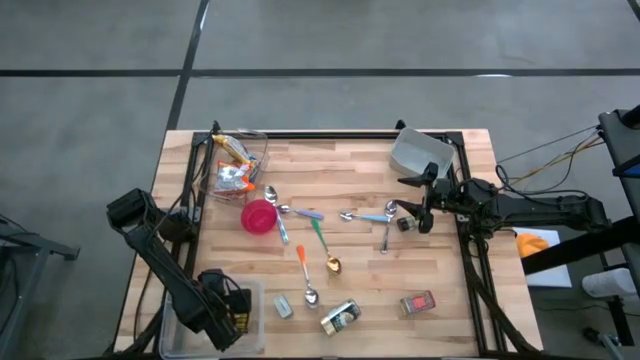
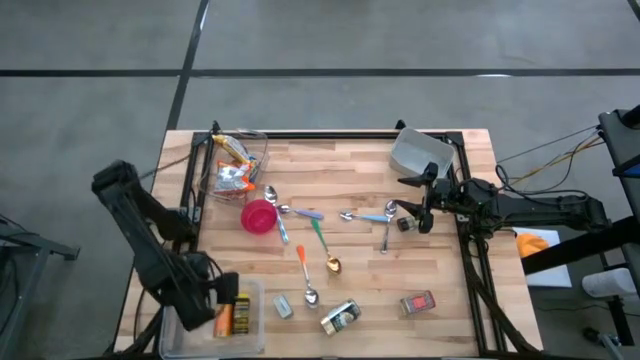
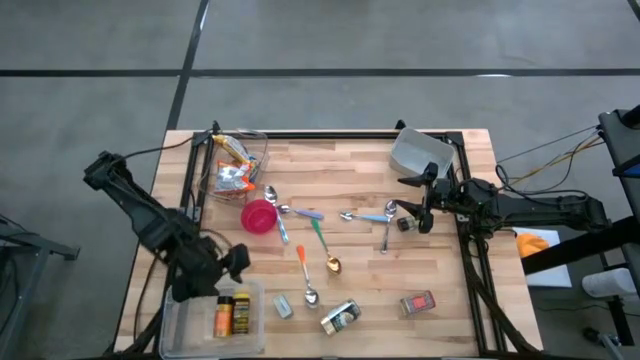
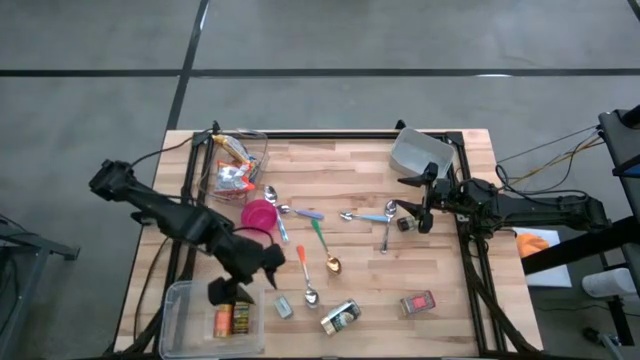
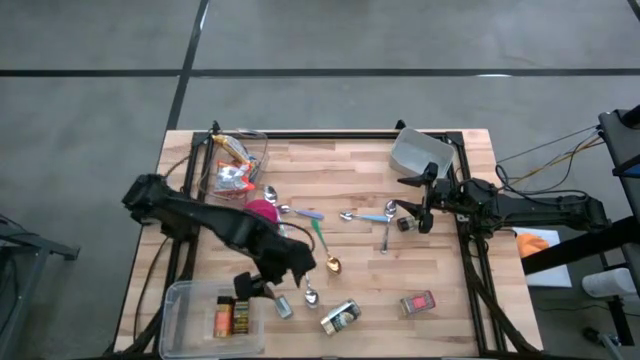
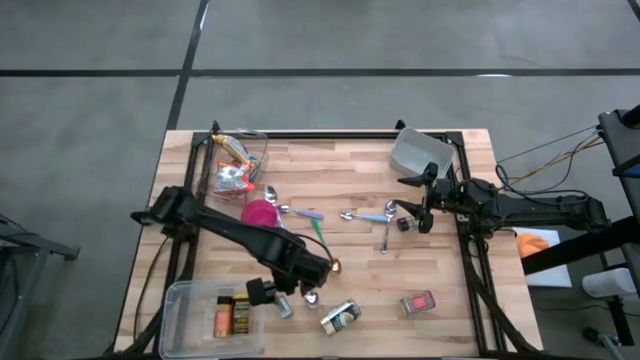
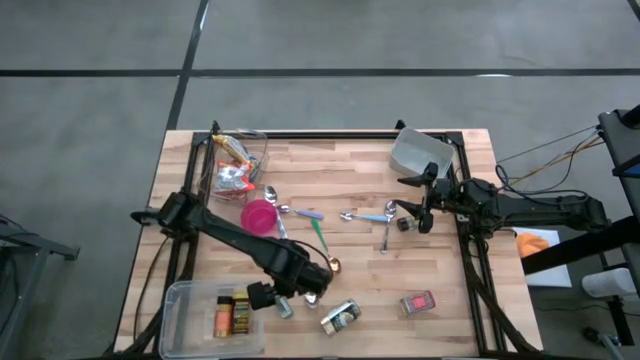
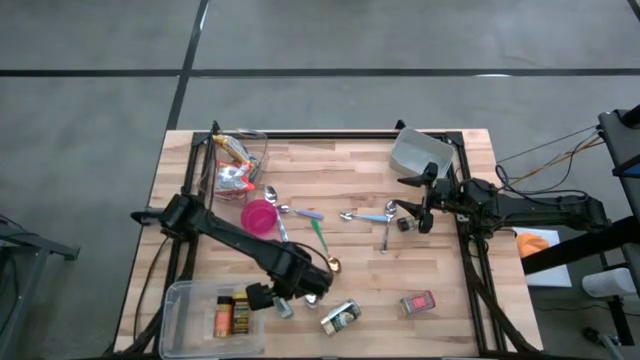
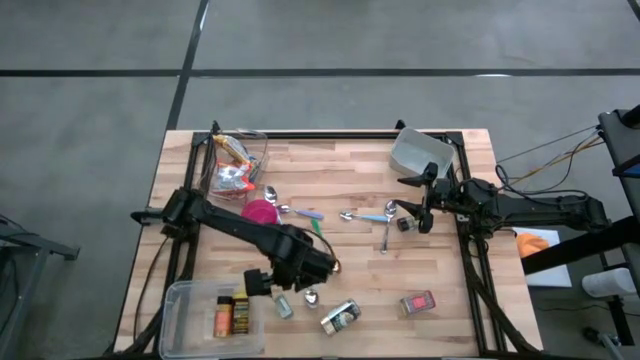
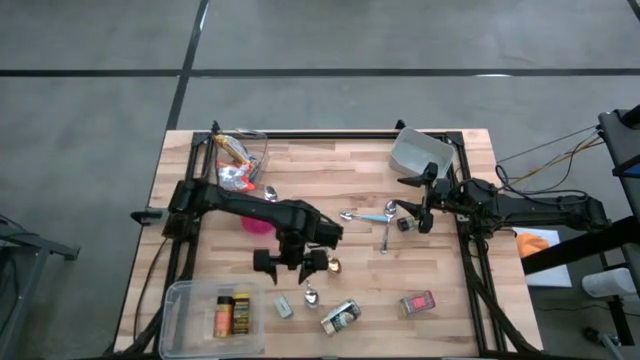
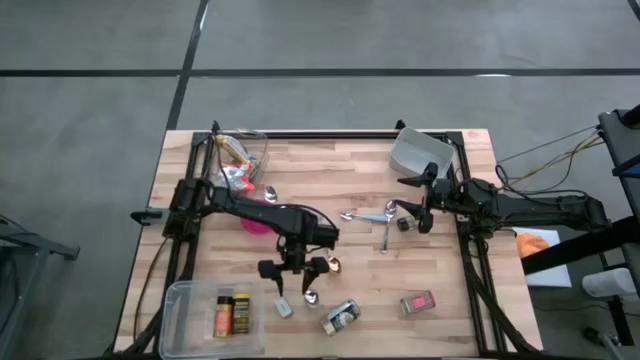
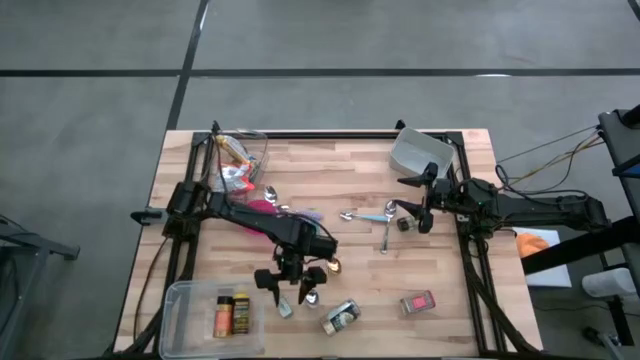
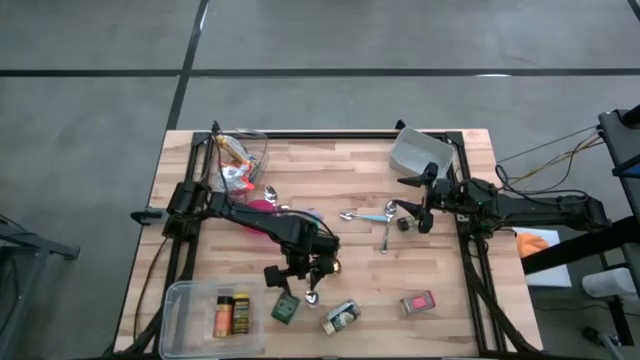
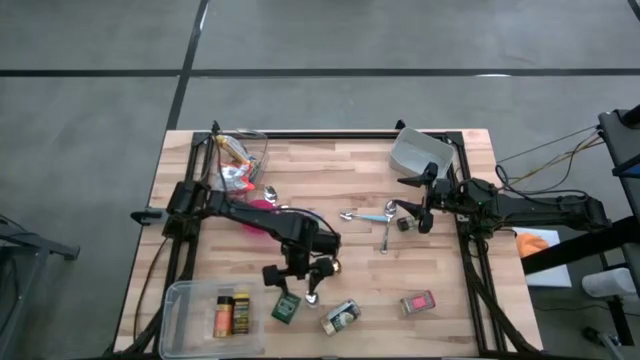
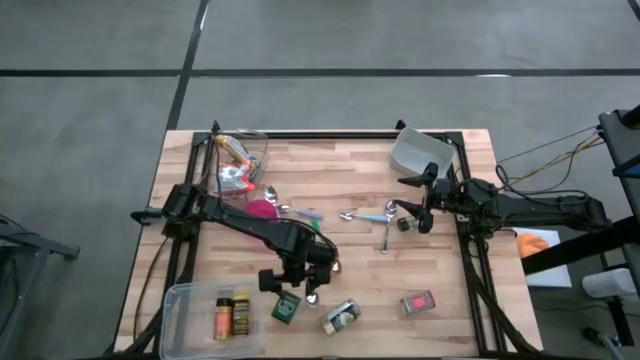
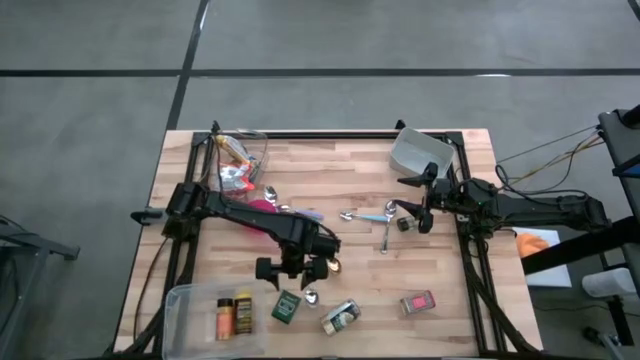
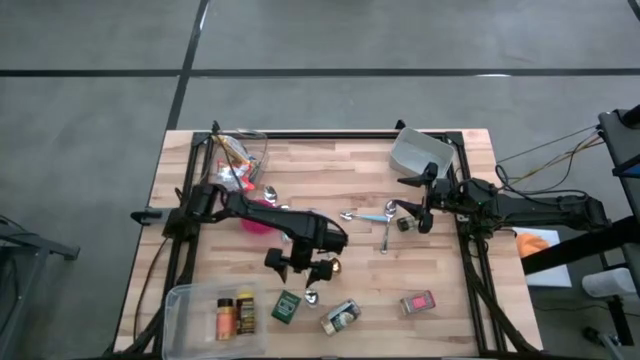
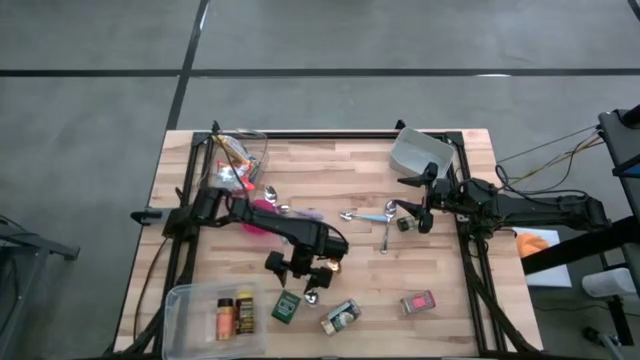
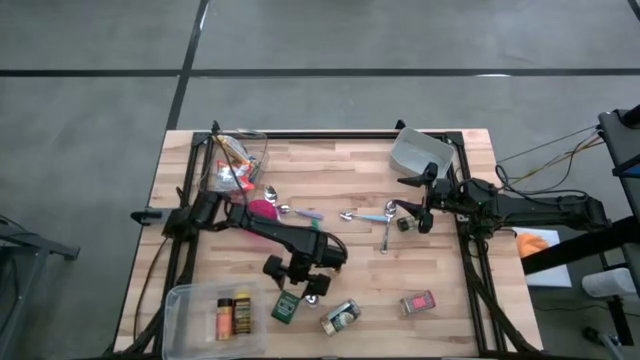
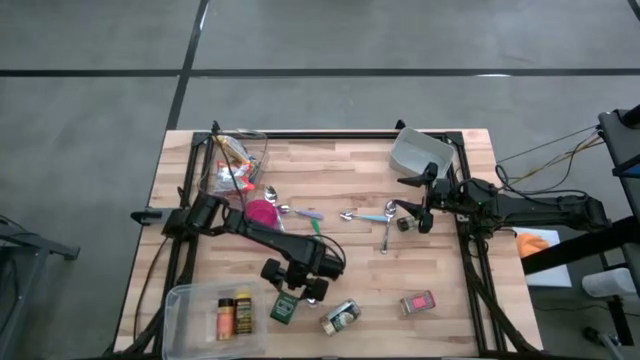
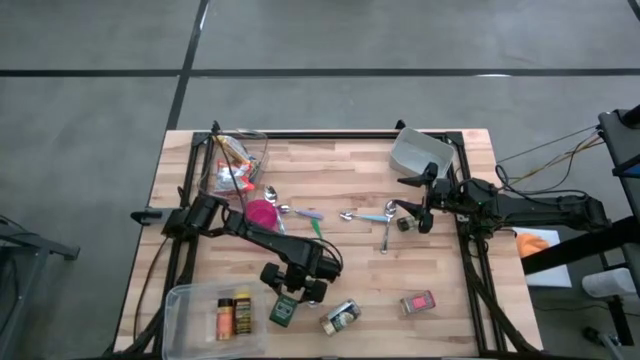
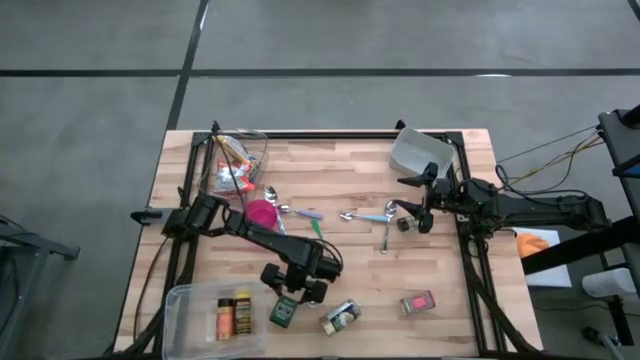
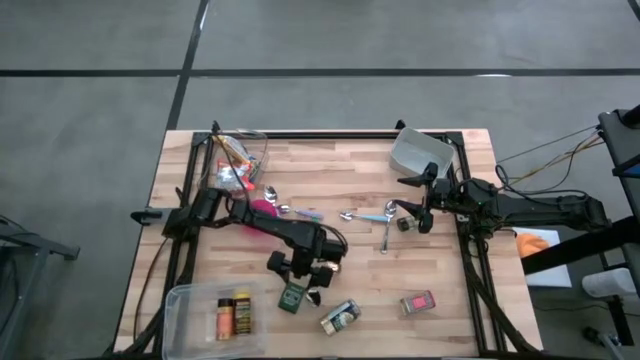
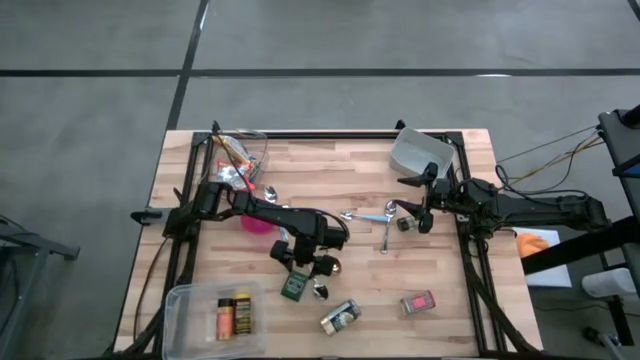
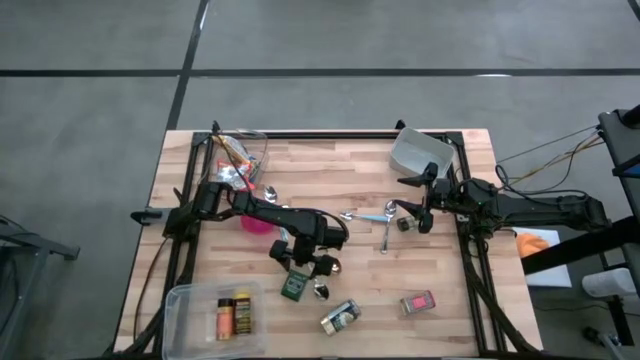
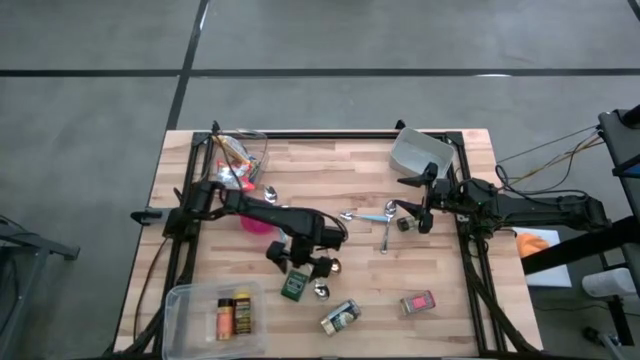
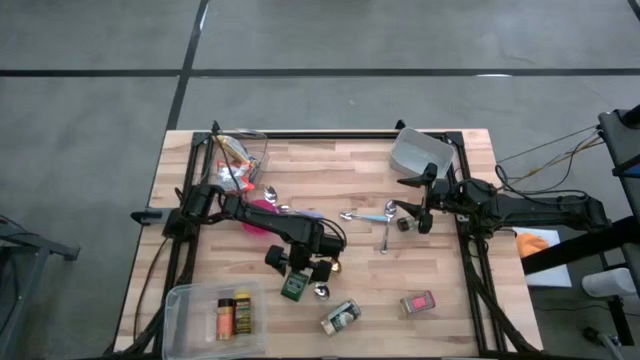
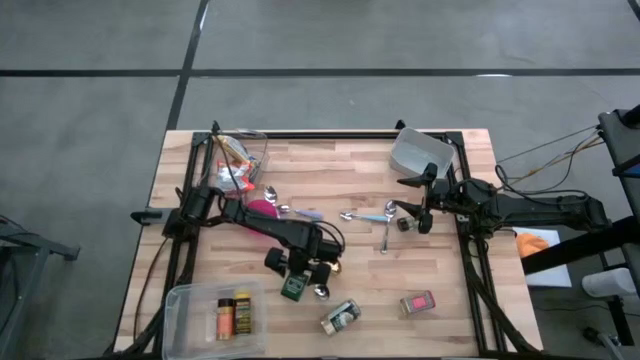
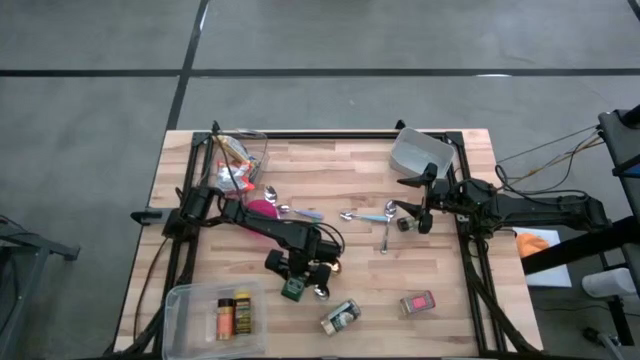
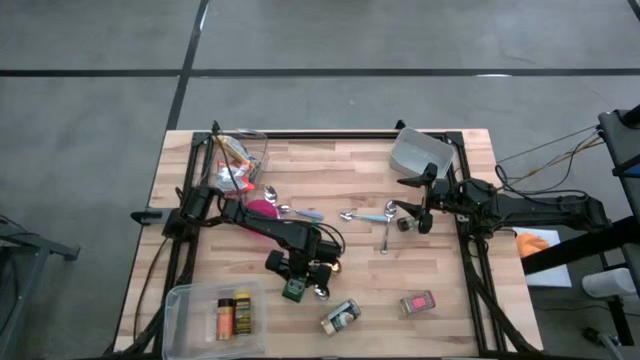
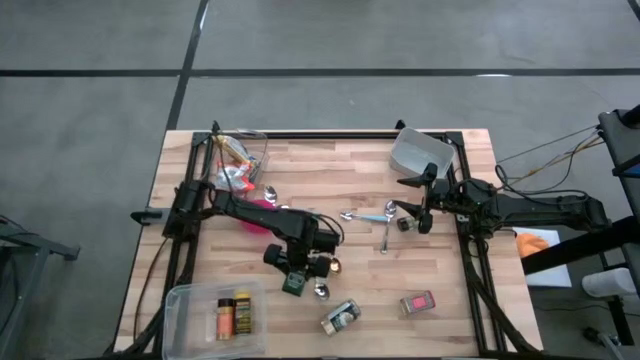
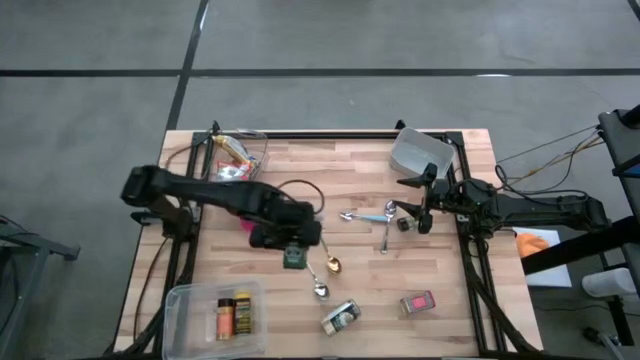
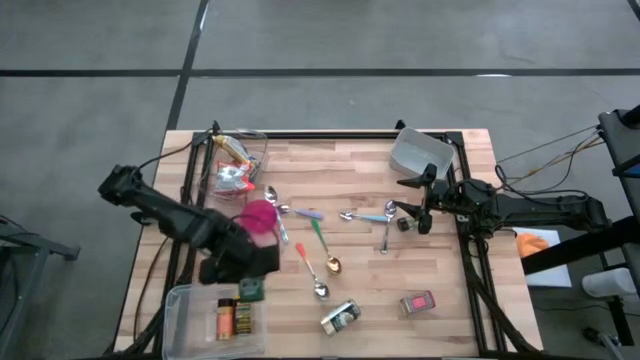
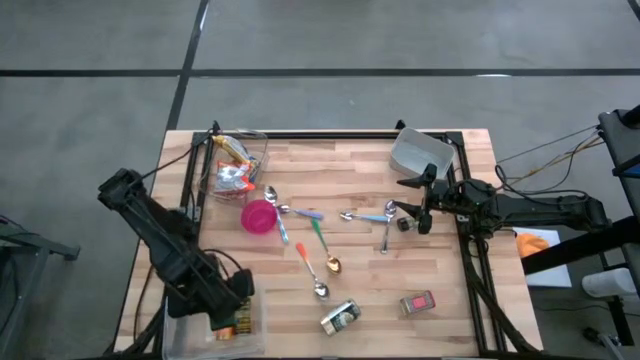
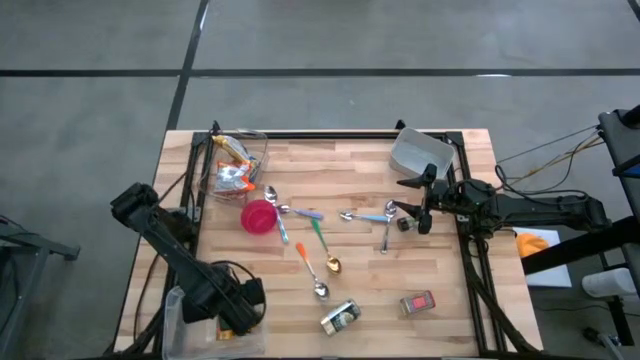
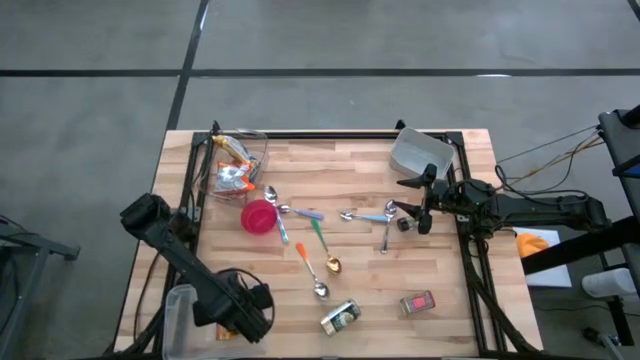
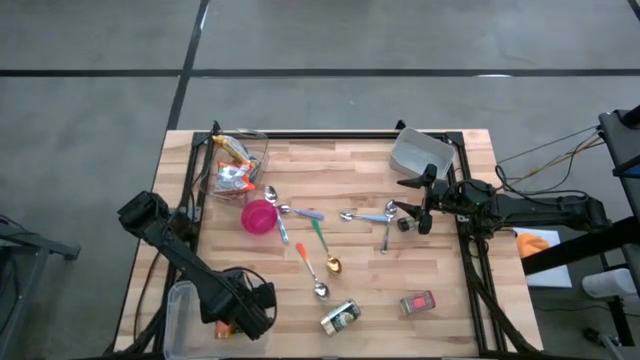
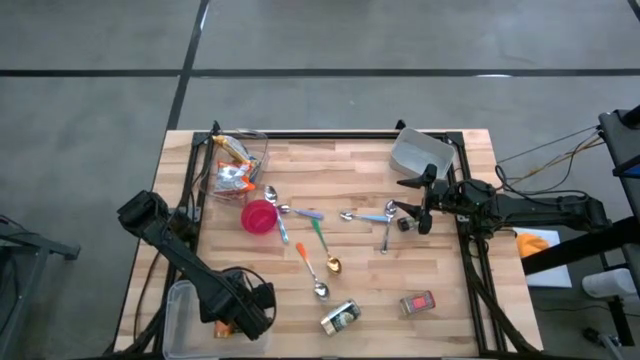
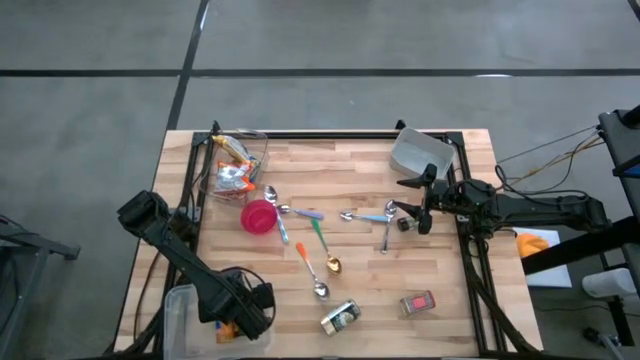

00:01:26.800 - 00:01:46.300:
Put the green seasoning can into the white bin
